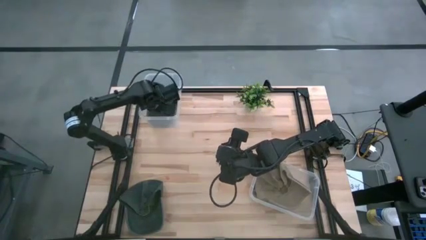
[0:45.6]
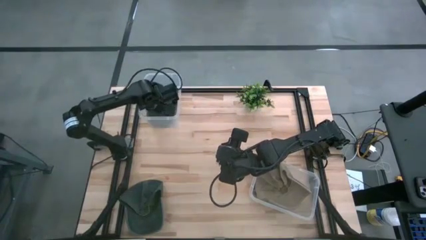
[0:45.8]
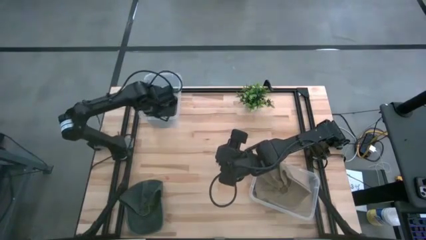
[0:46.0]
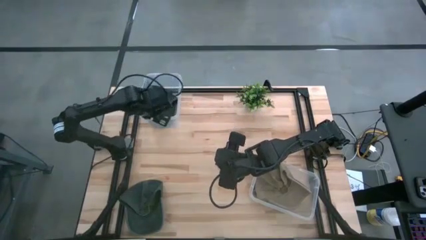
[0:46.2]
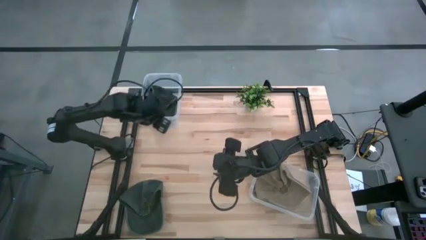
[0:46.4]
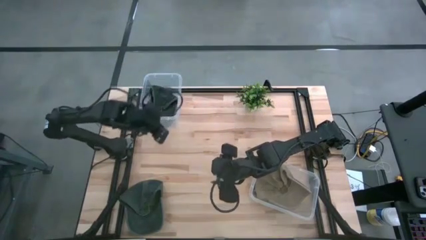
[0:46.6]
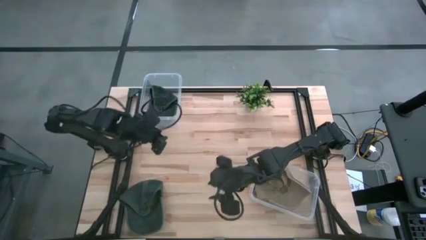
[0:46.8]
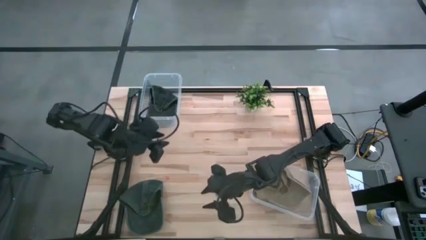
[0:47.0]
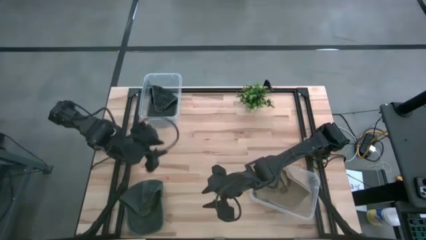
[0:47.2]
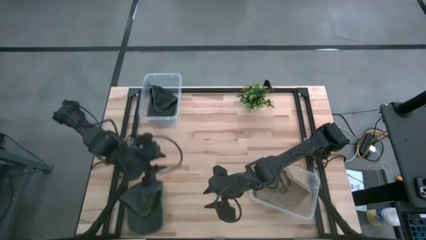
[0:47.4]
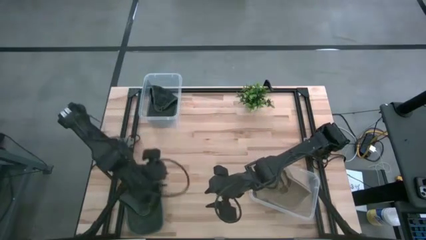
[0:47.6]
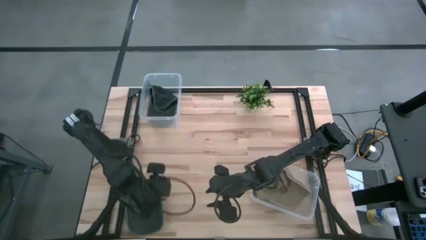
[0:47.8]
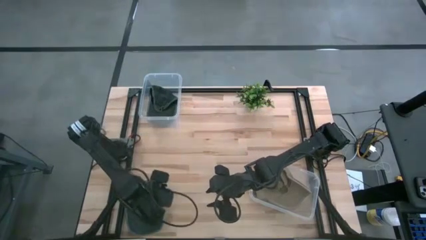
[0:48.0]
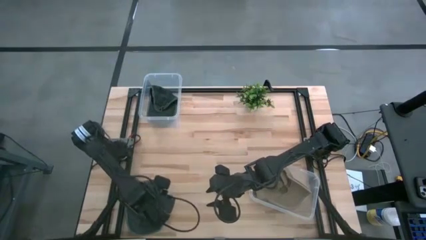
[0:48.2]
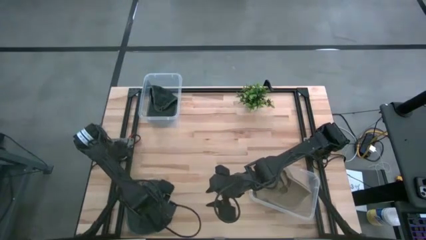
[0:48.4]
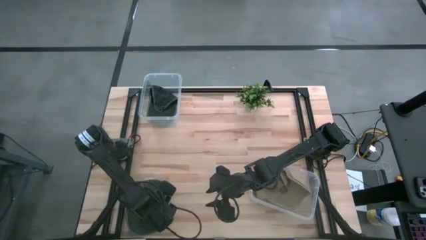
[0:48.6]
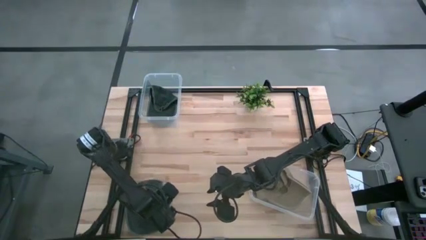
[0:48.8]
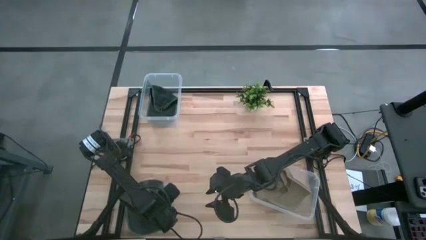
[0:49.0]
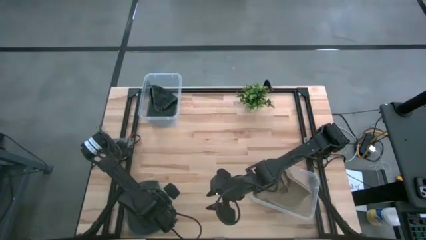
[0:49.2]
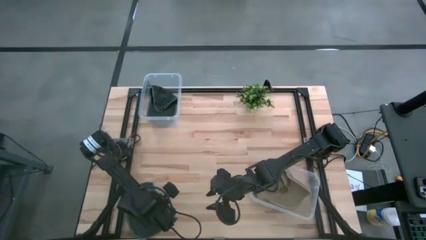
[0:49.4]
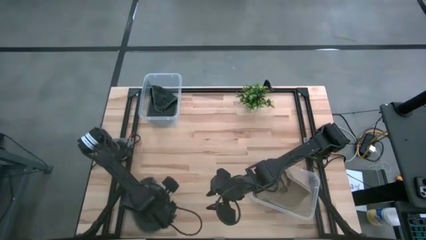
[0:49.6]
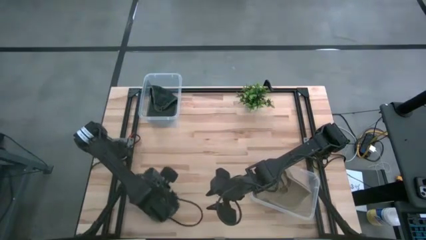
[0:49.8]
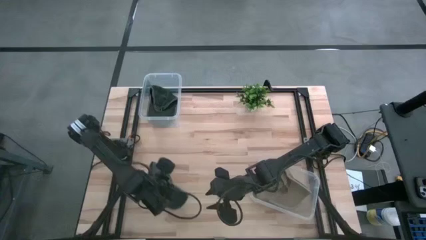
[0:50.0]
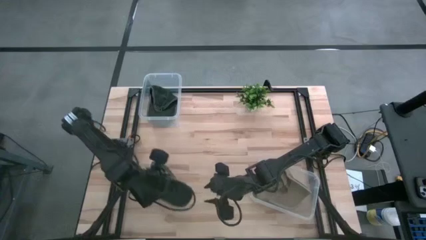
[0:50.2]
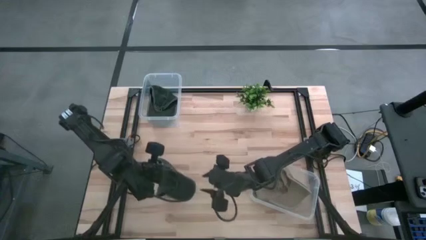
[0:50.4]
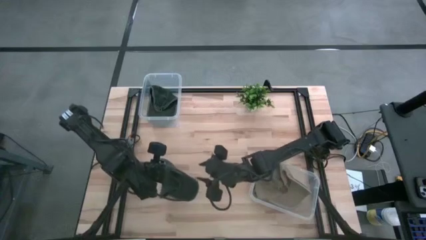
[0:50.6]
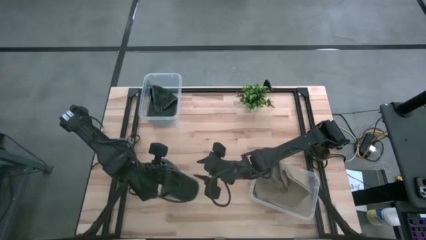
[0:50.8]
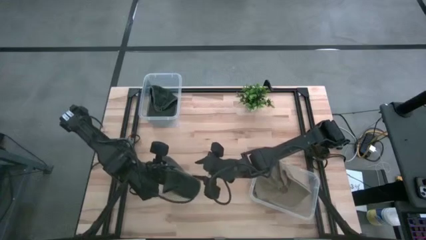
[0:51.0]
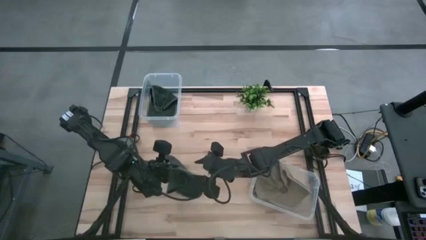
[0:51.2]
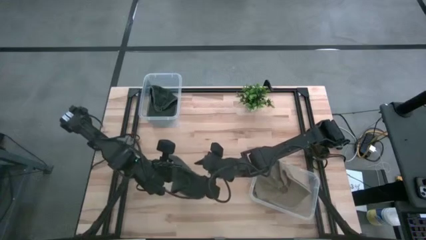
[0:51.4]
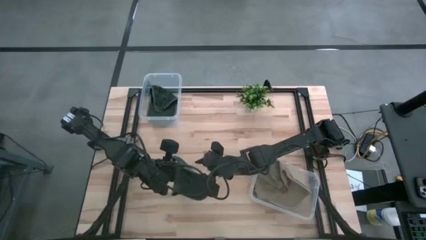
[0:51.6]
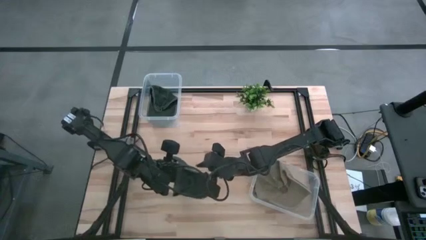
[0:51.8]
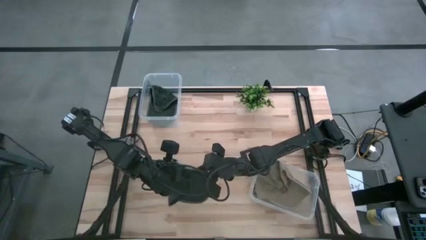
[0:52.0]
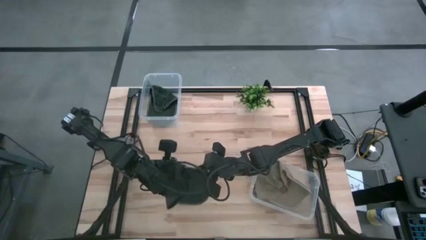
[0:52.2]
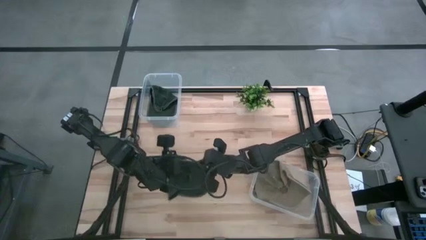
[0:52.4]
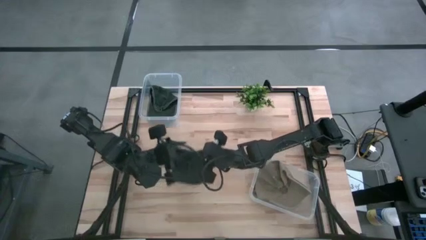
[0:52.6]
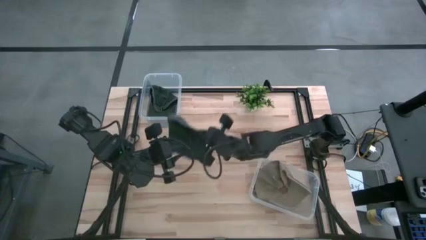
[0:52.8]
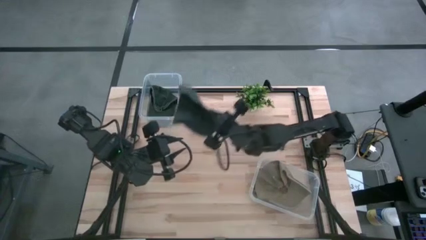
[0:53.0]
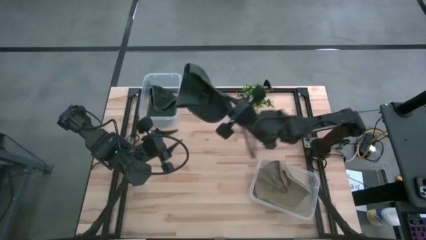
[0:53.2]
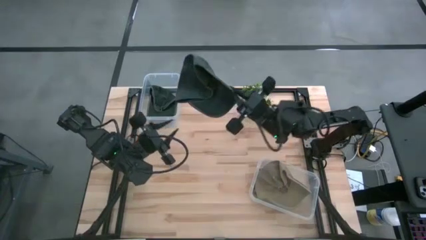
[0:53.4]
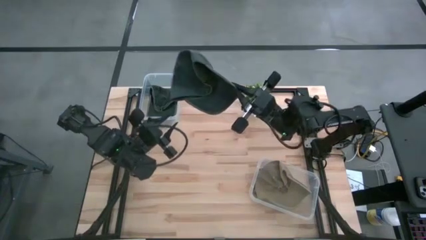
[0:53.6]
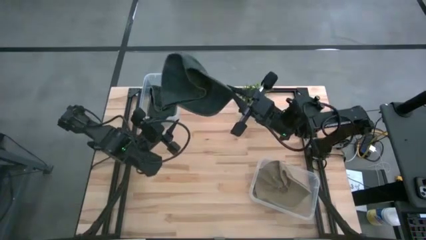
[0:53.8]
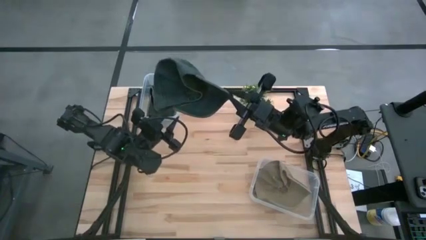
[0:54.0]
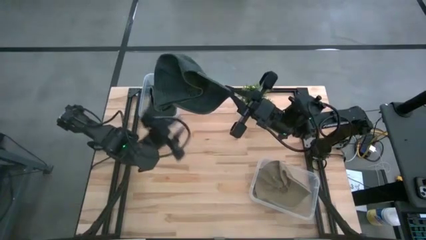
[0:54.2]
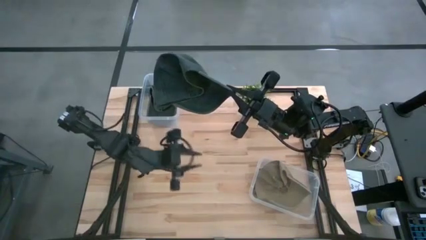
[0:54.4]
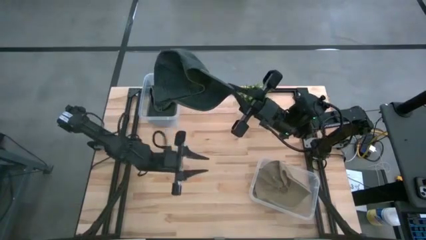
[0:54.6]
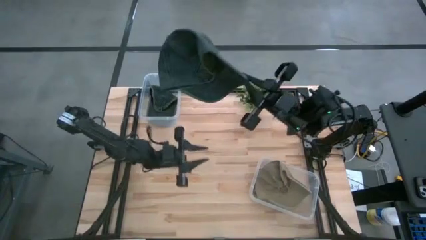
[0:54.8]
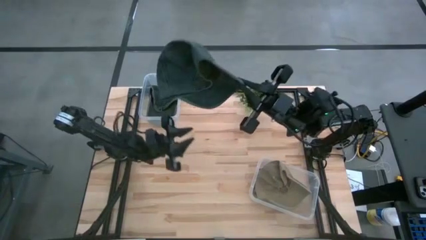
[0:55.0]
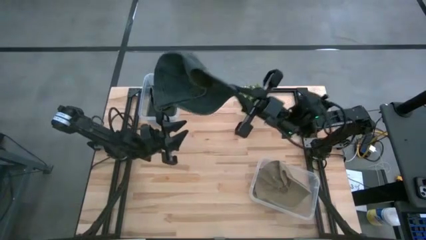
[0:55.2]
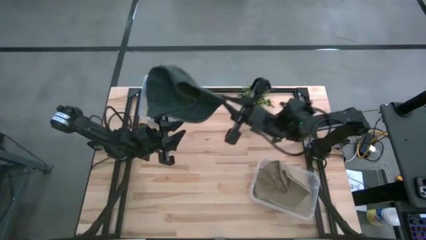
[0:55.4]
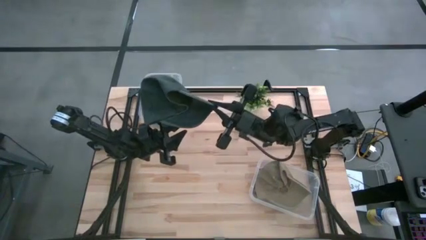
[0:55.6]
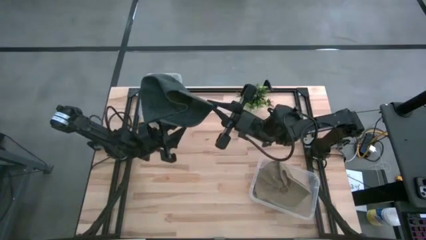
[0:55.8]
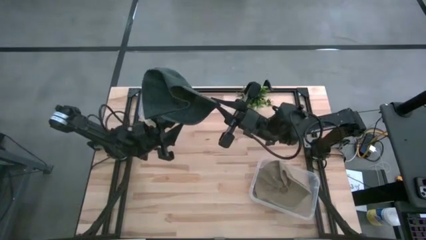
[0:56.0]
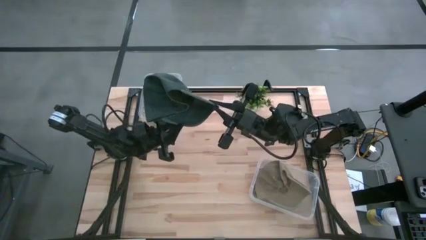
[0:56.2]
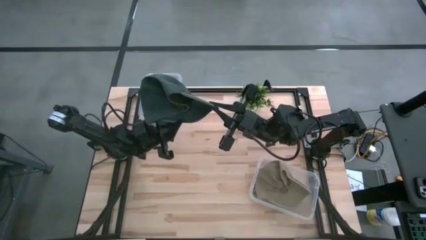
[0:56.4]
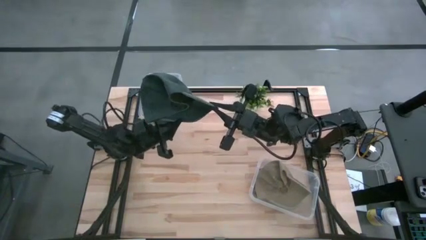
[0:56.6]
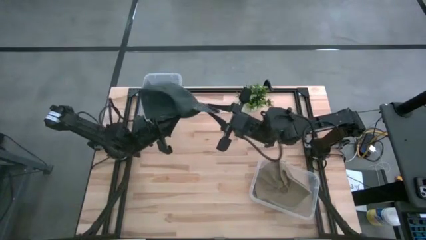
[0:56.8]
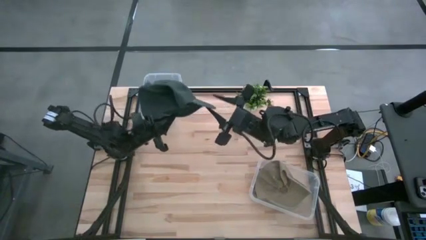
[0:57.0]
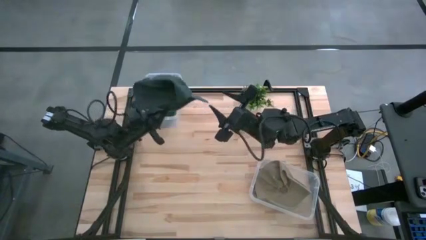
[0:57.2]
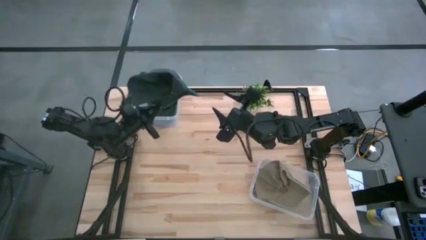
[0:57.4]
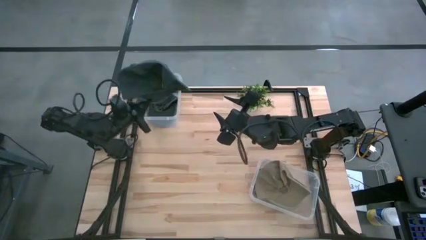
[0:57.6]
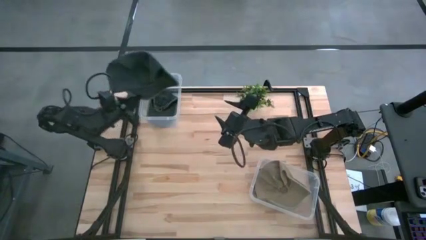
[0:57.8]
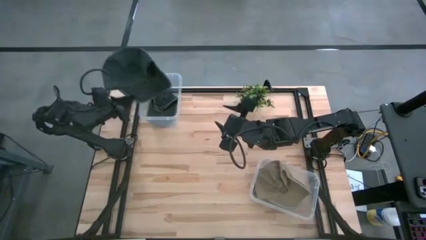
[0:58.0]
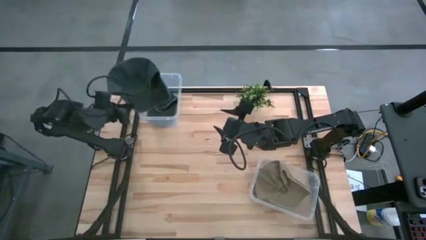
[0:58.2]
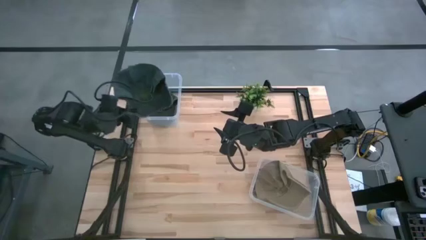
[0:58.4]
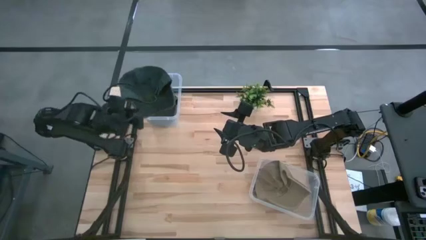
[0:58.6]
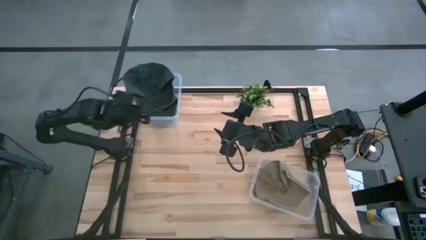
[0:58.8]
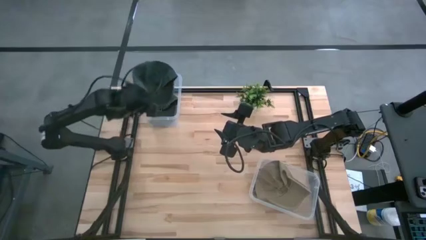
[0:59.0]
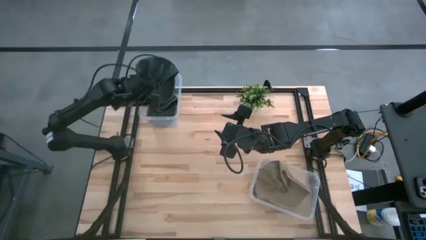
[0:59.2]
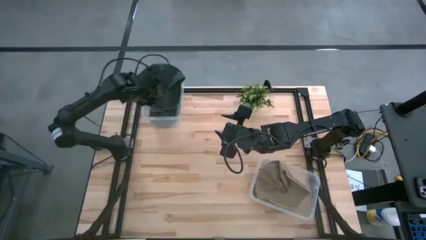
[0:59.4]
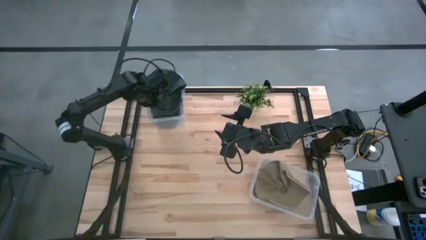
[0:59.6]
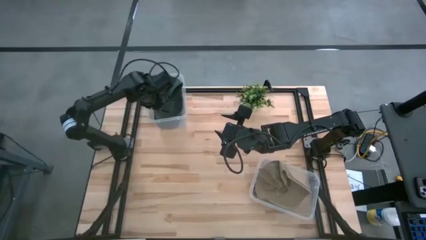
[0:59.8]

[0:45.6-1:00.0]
Task: Pick & Place hat
Put the black cap into the top transparent bin
